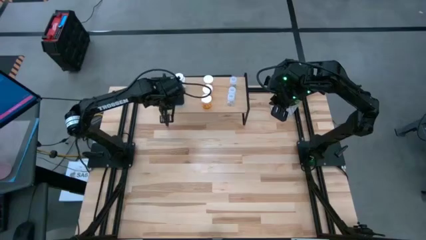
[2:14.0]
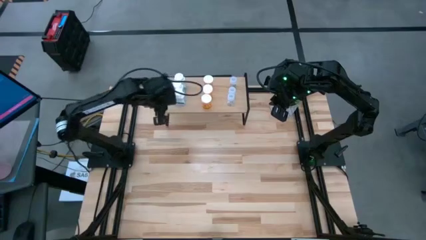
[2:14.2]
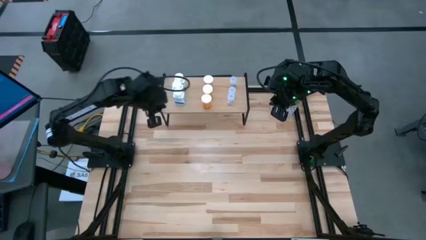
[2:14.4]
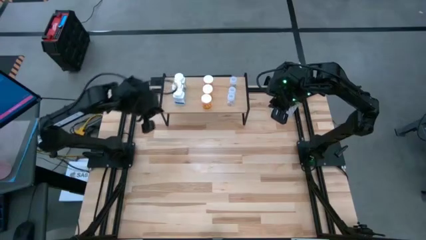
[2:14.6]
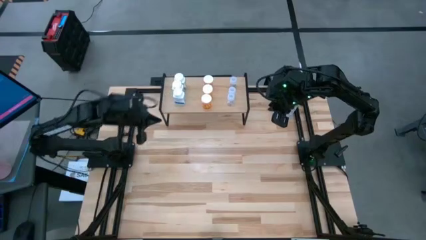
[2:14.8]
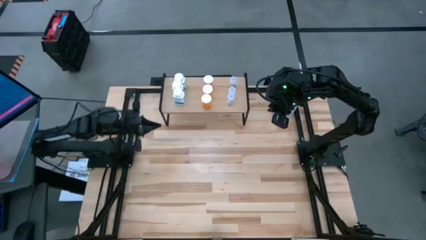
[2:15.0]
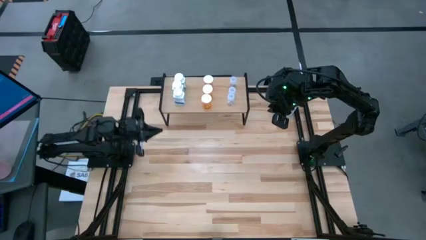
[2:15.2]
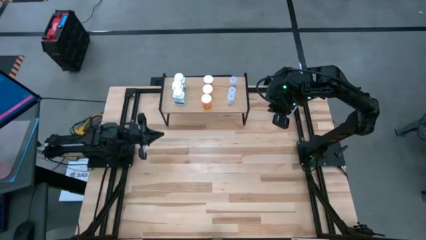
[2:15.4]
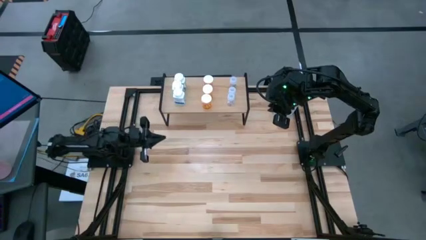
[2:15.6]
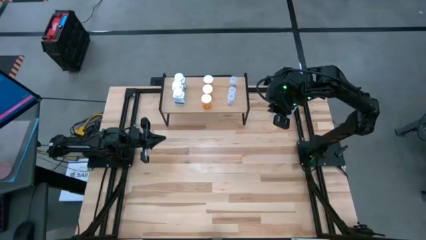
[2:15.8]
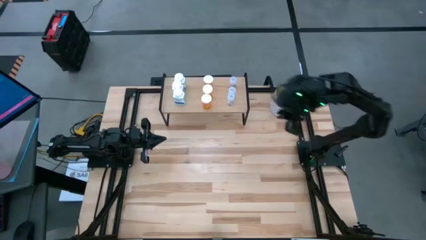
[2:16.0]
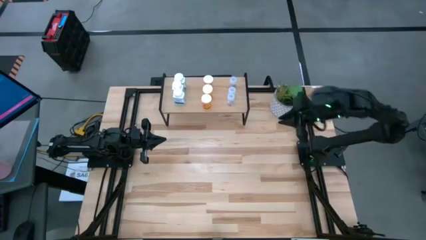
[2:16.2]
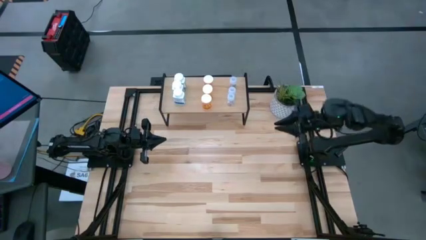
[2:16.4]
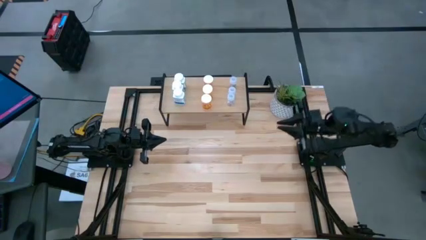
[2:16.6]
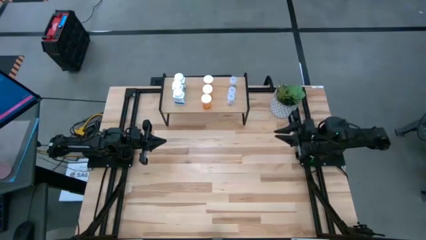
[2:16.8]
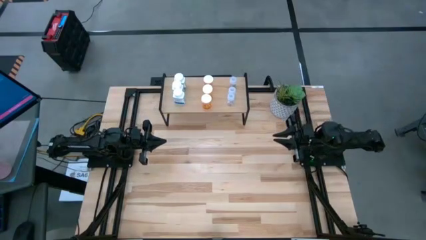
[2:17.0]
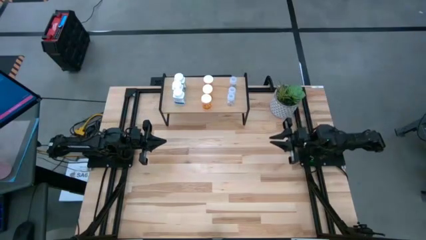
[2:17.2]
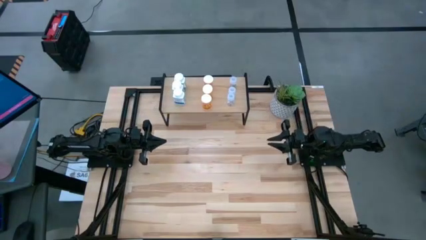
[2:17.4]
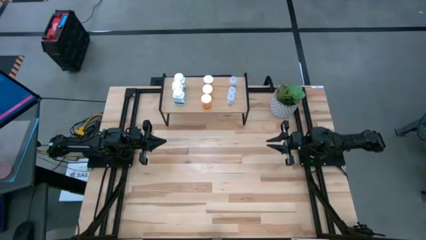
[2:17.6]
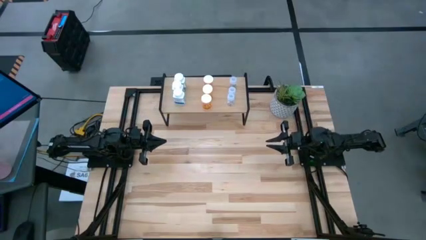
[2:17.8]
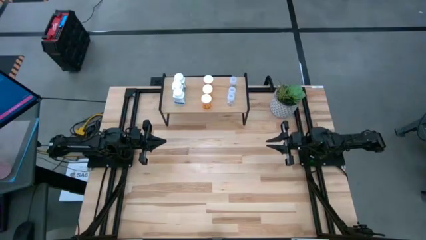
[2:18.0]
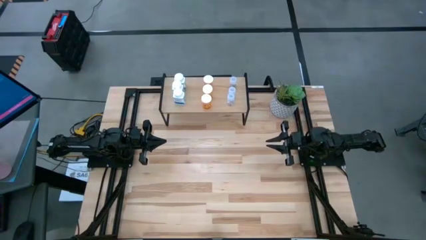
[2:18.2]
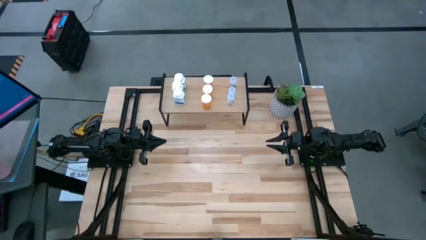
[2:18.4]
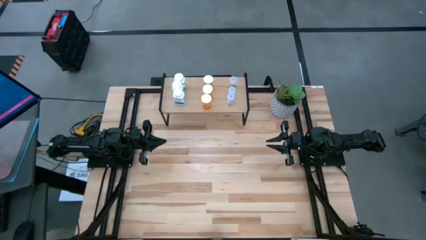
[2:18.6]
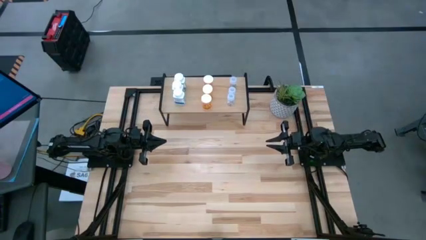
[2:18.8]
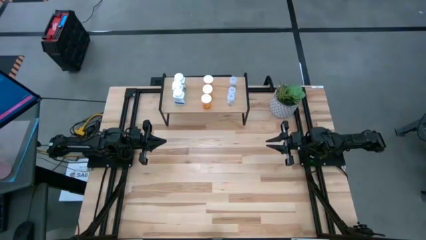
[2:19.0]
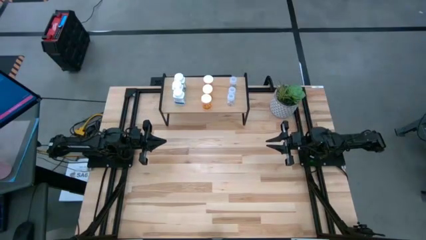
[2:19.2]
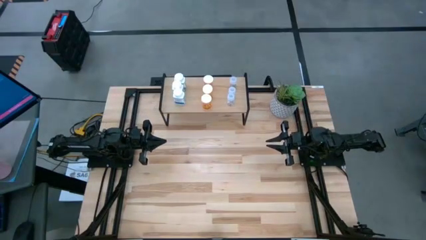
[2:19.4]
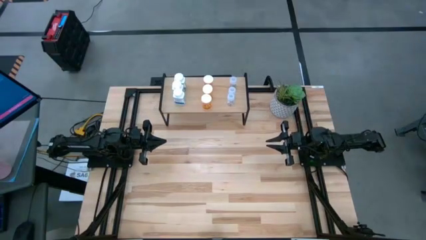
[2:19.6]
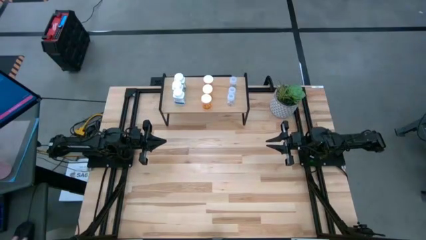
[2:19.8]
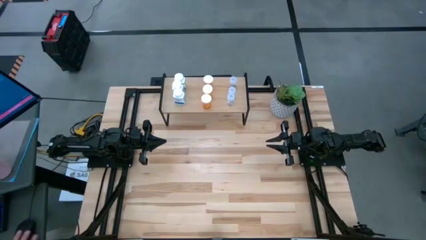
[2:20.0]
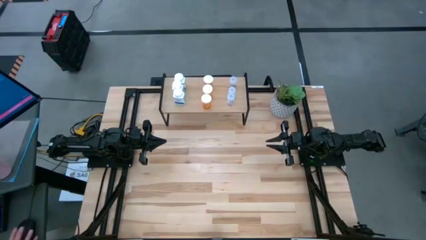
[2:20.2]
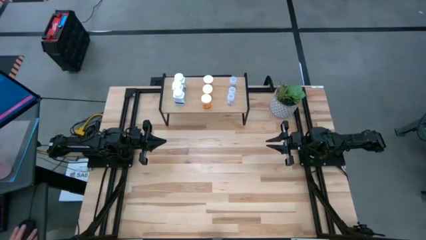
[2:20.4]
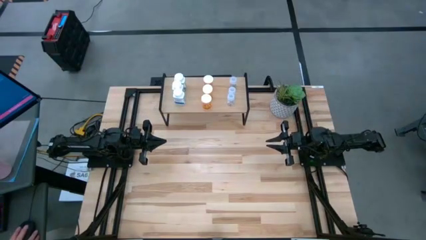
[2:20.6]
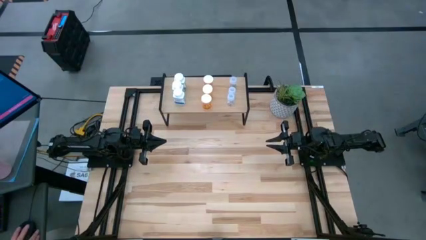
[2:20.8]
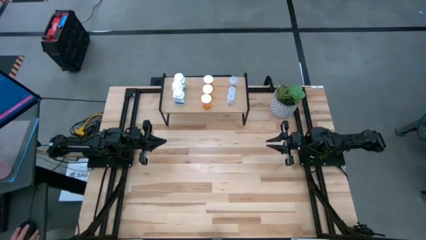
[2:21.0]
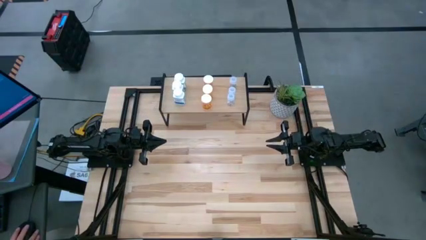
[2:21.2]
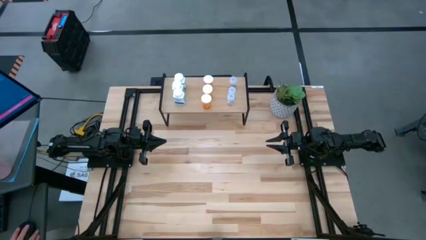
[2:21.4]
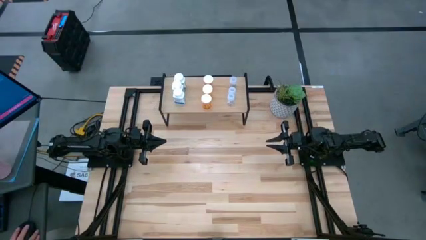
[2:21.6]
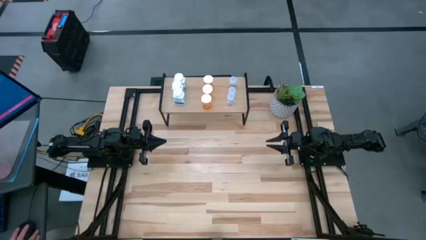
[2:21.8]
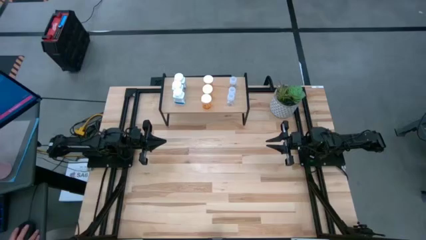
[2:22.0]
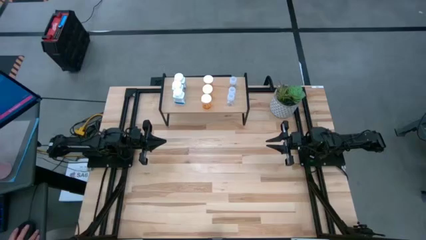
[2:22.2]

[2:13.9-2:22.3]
Task: Pick and place medicine bottles onto shelf by color
Return to Home Position

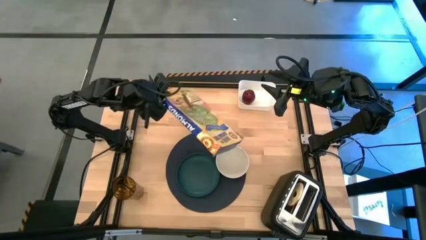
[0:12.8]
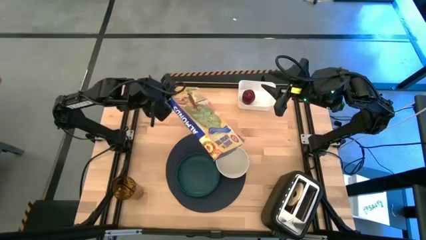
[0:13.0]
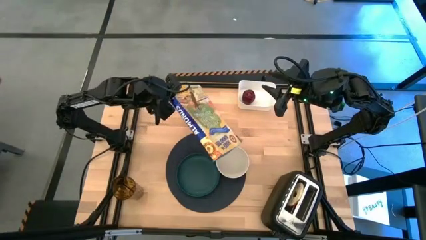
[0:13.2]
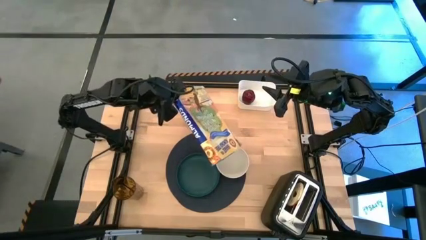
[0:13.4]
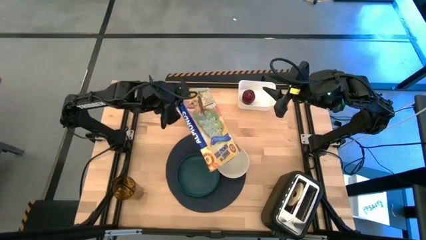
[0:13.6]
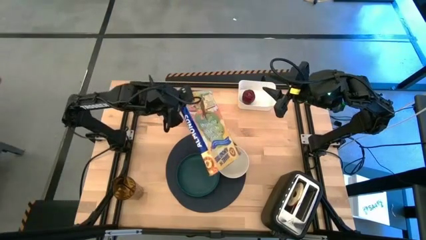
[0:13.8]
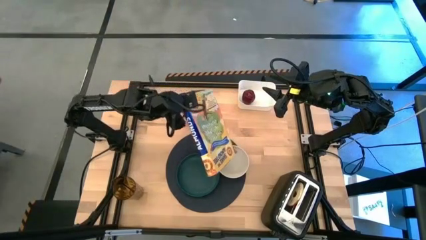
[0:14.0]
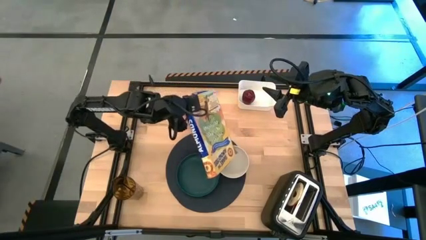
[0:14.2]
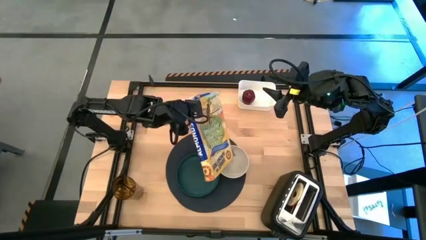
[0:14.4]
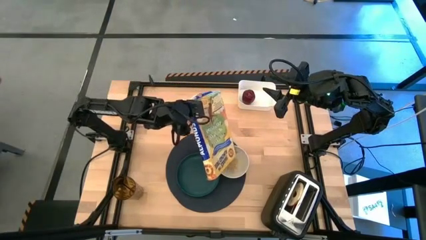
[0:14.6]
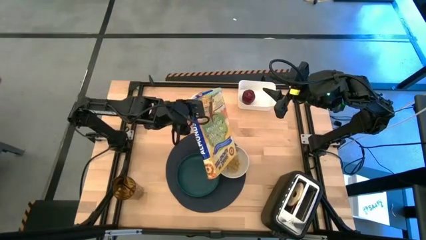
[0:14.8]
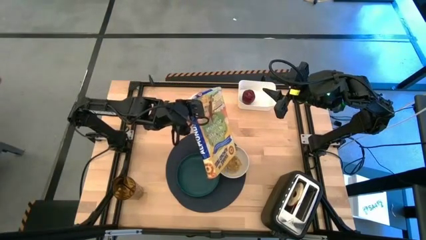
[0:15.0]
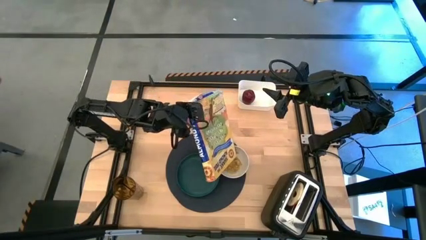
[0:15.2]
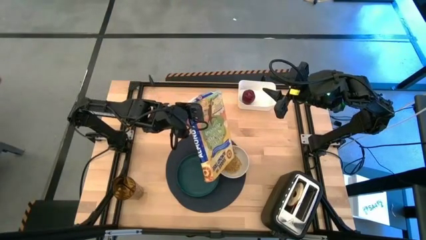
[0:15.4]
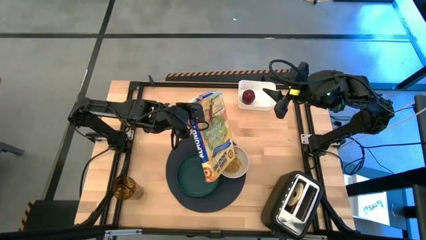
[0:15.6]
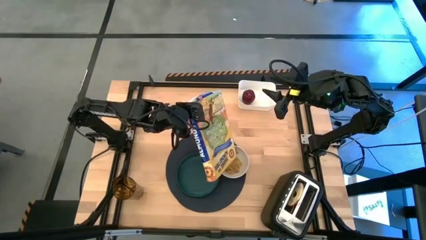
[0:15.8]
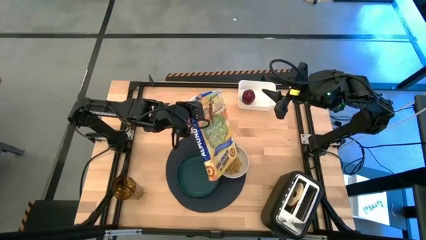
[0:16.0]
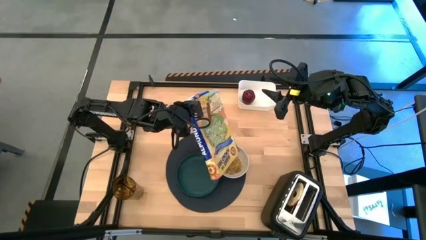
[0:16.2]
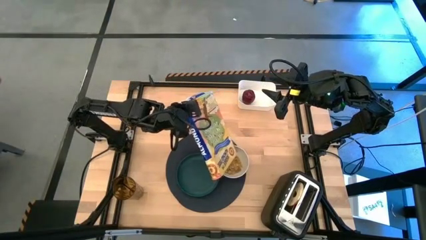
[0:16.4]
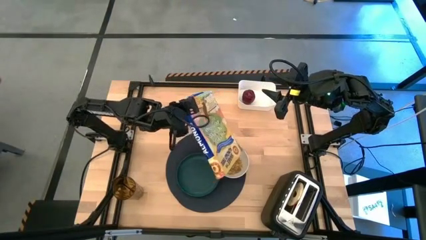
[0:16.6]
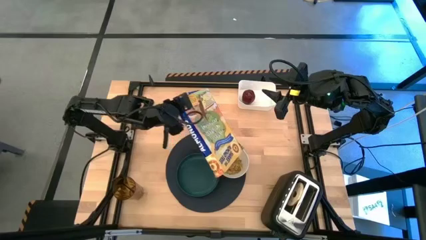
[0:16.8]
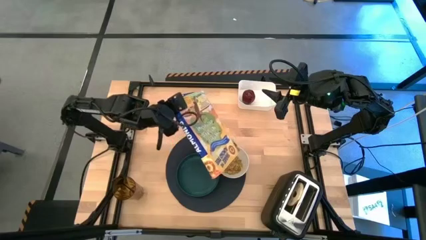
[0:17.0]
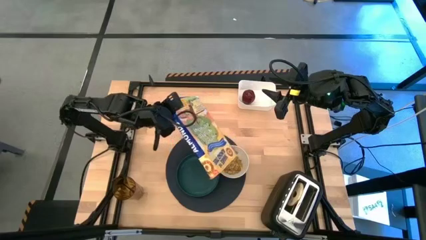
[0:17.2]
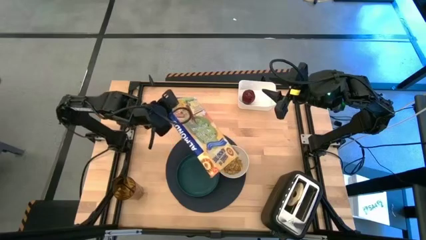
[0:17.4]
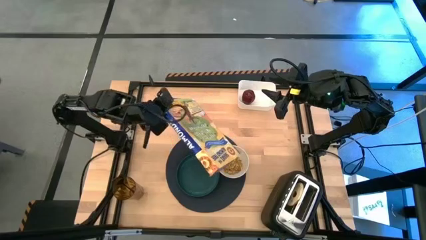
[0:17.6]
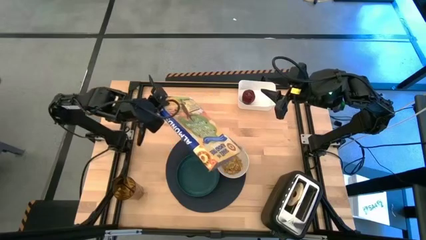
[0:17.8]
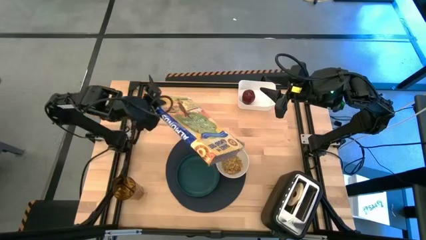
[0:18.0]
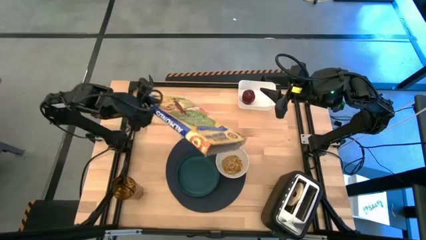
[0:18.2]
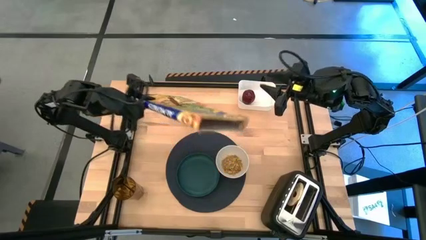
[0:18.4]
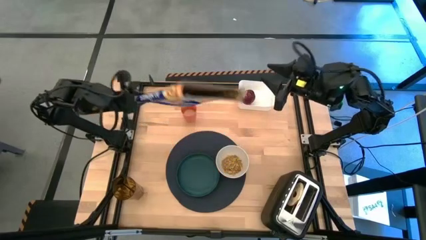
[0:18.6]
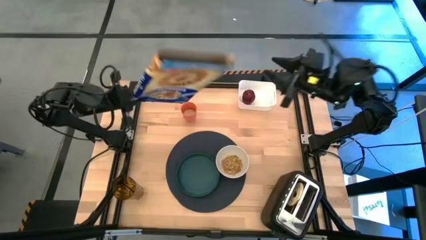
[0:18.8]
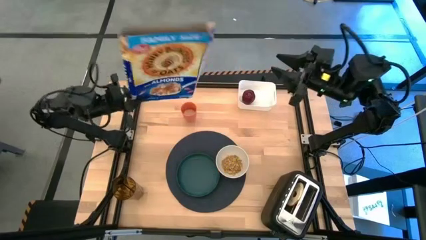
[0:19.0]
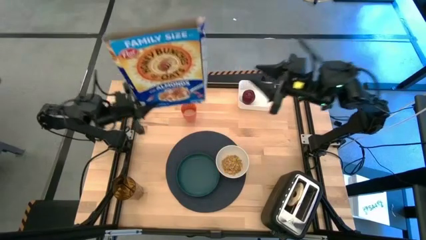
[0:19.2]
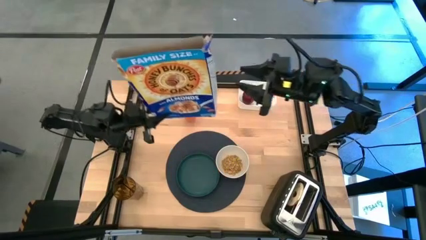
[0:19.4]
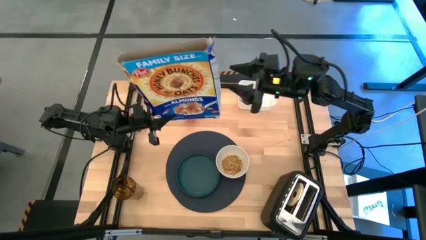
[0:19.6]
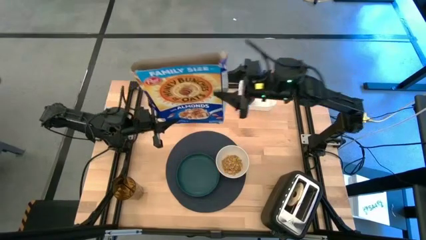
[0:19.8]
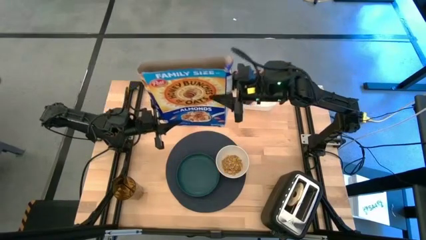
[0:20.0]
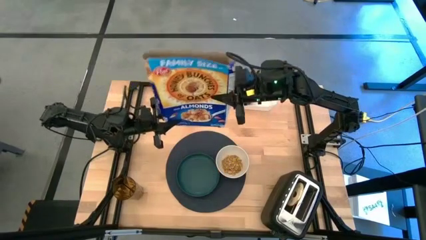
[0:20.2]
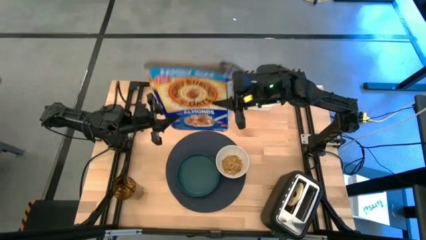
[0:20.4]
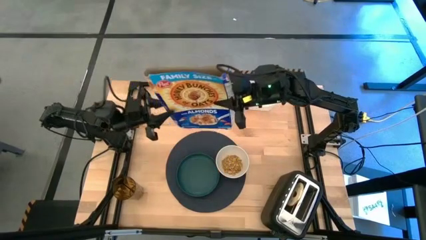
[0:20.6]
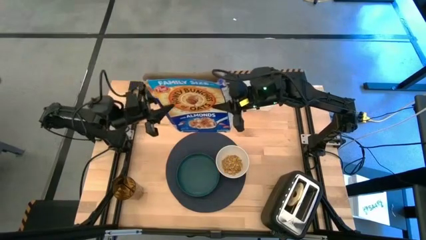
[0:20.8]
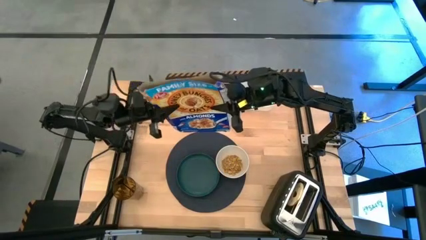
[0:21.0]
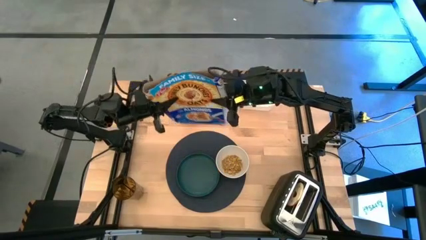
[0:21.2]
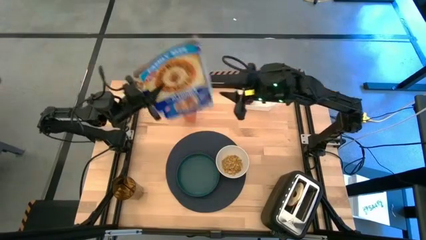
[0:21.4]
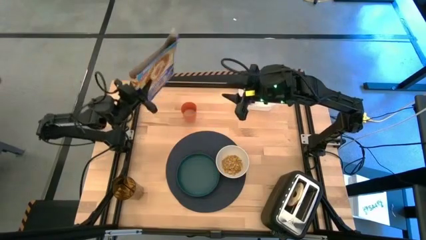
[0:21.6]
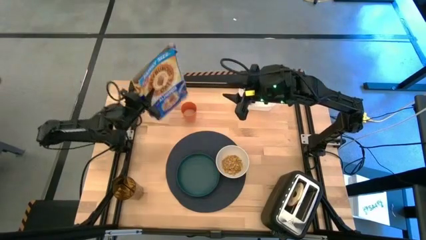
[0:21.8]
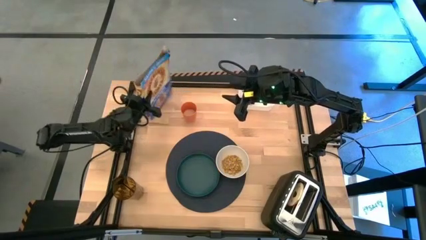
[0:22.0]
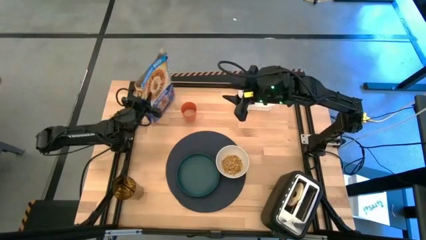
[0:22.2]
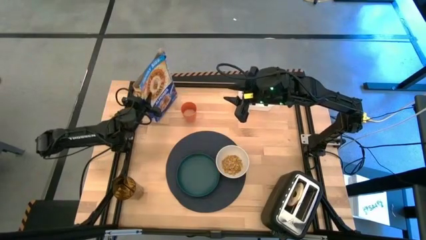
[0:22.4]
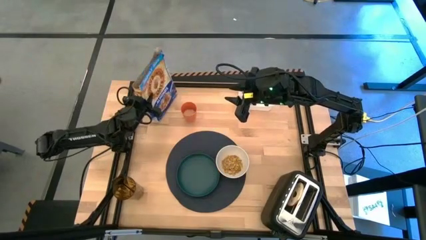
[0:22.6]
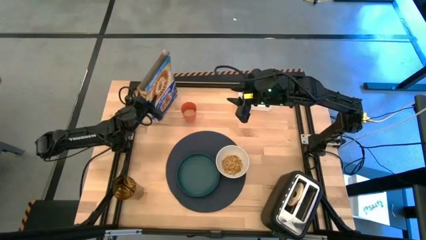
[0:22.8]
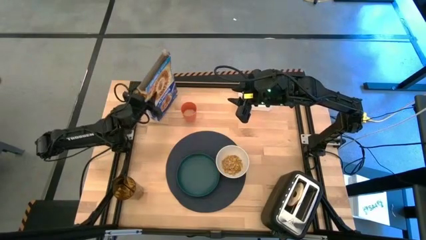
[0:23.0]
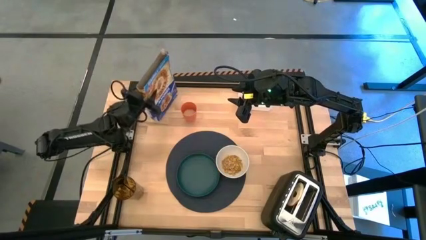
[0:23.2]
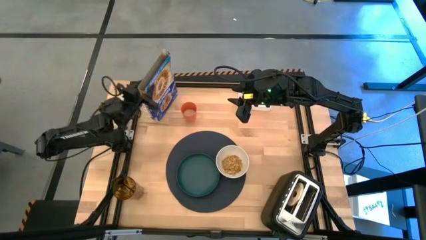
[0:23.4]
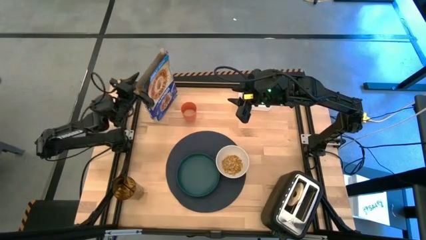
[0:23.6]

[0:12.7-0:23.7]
Task: Arrange a breakfast setting
Pour the cereal into the bowl
